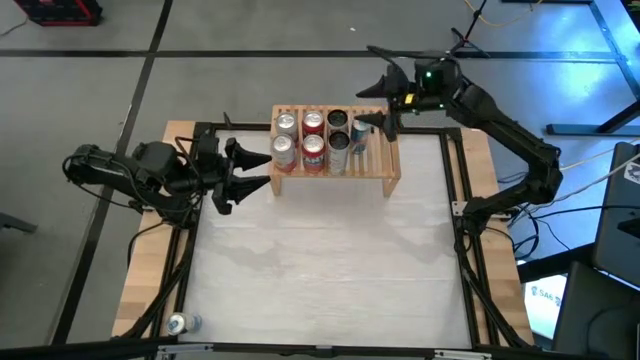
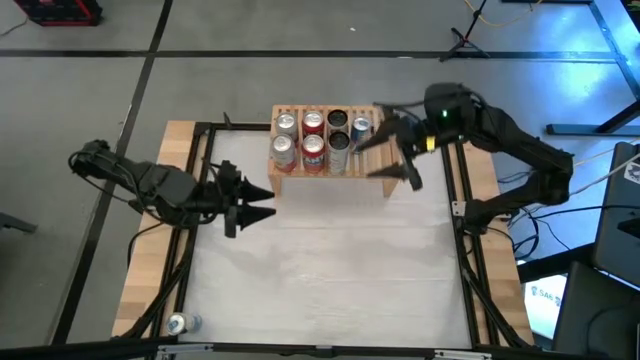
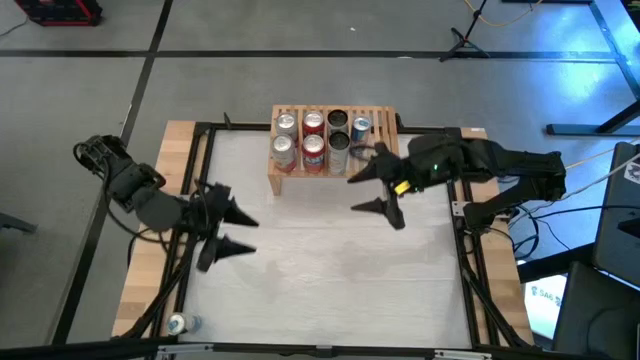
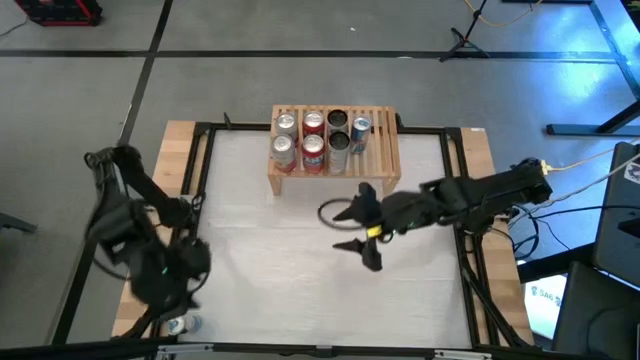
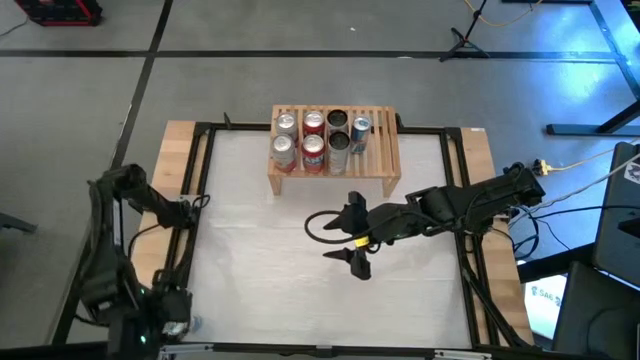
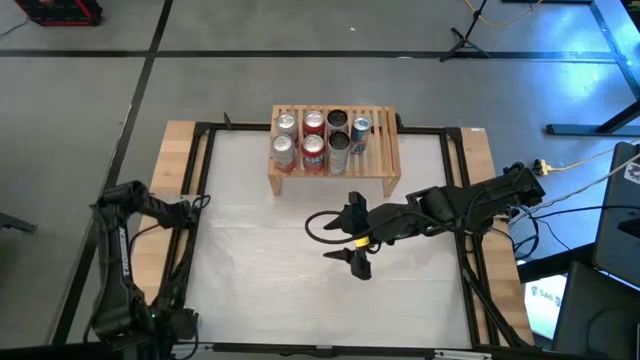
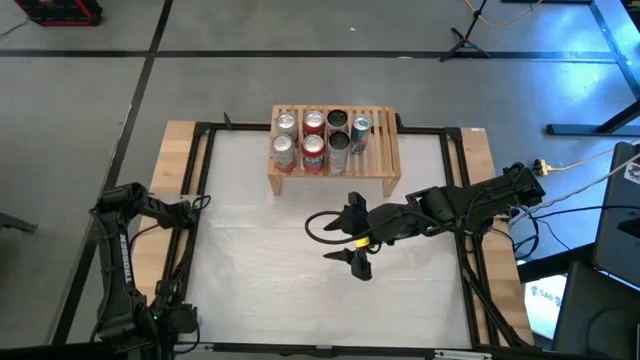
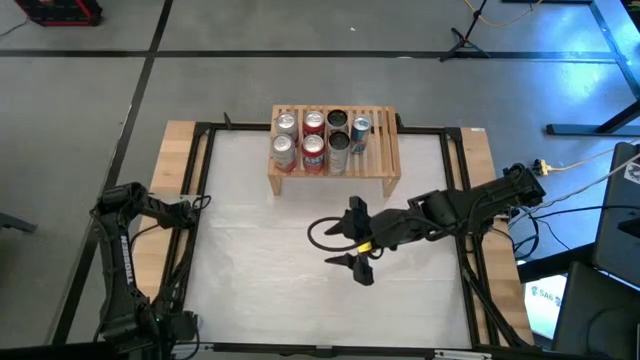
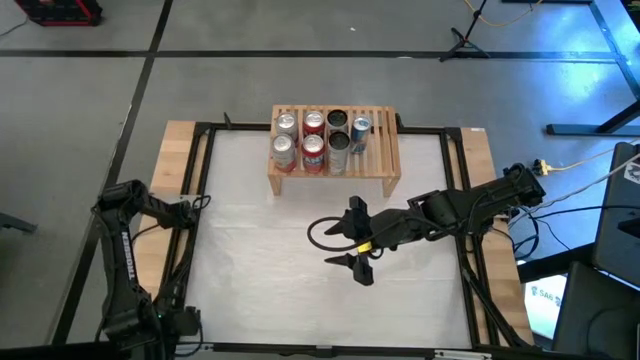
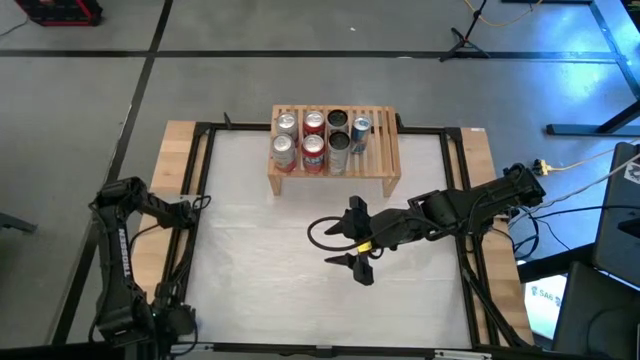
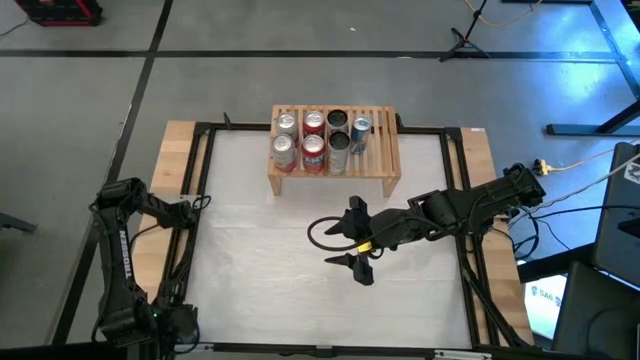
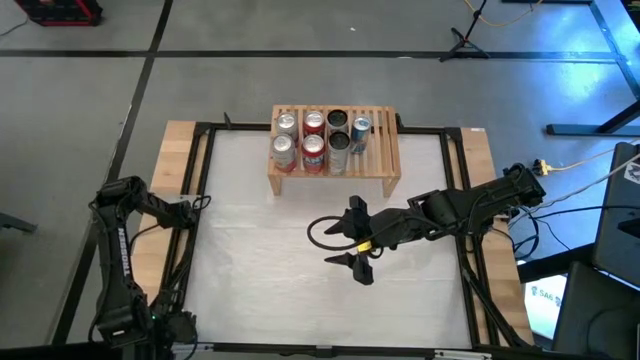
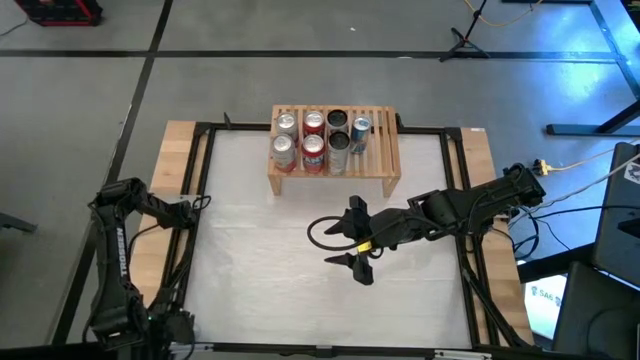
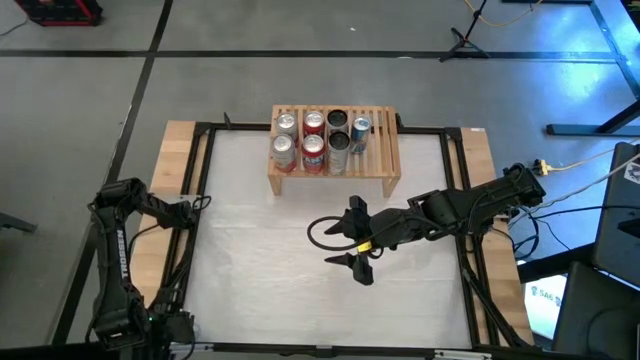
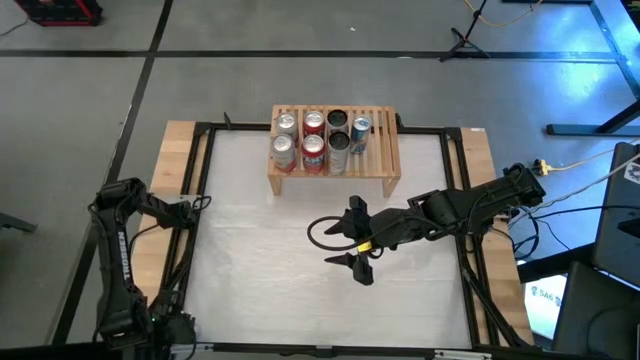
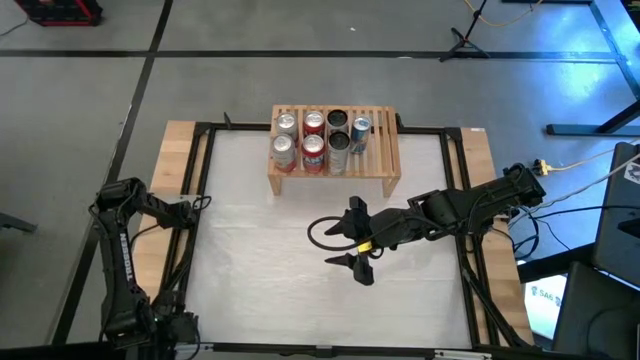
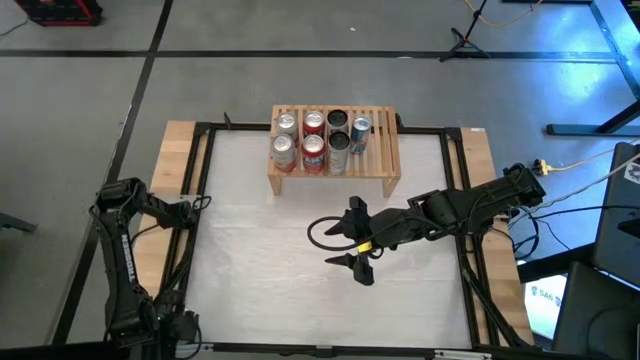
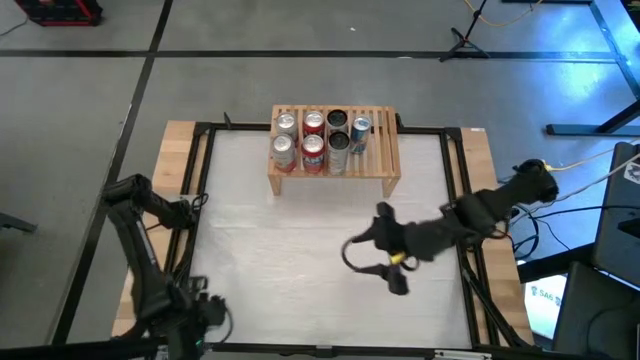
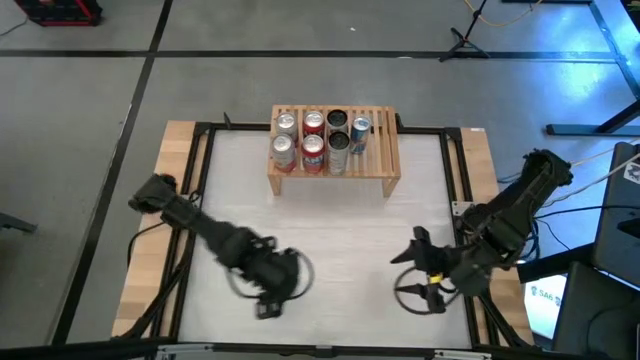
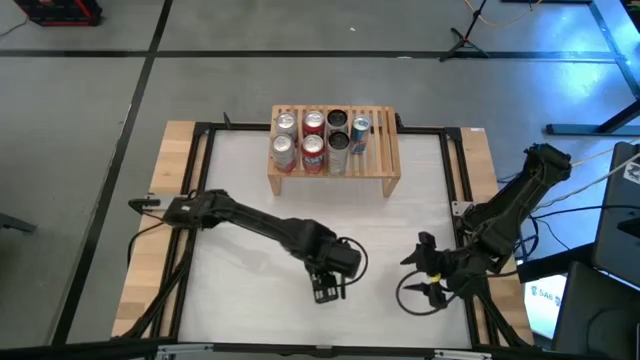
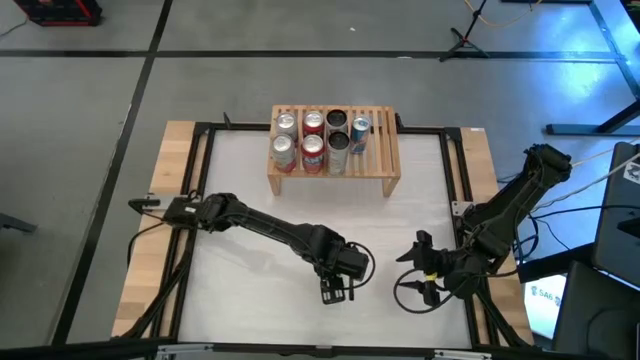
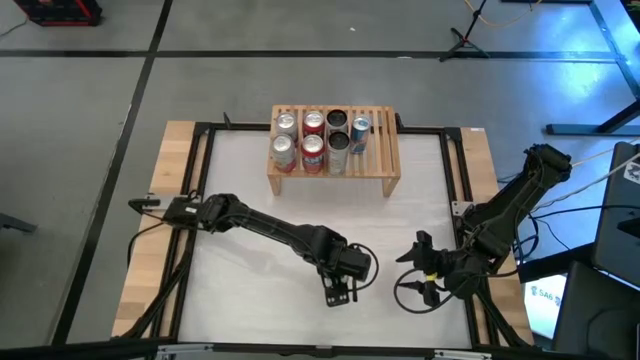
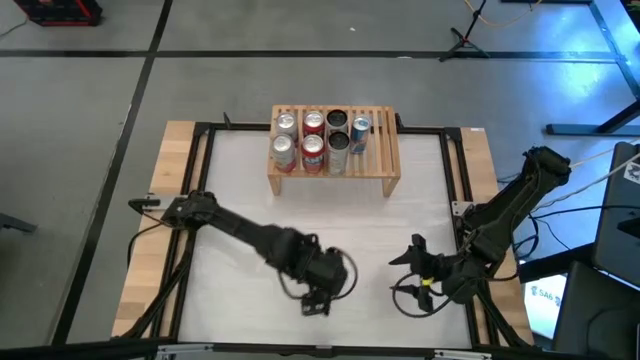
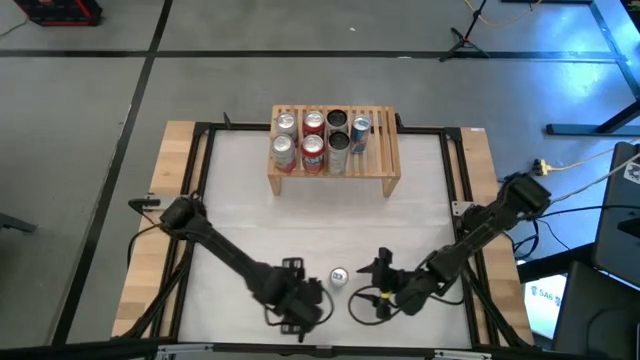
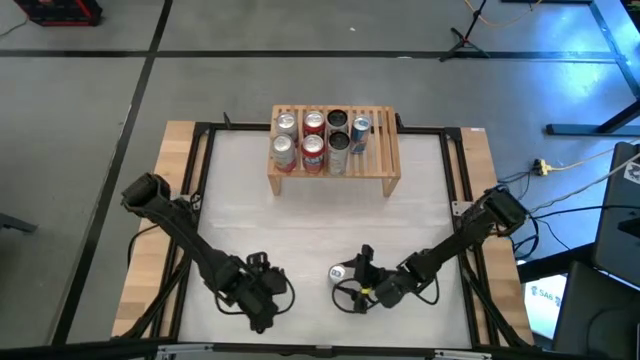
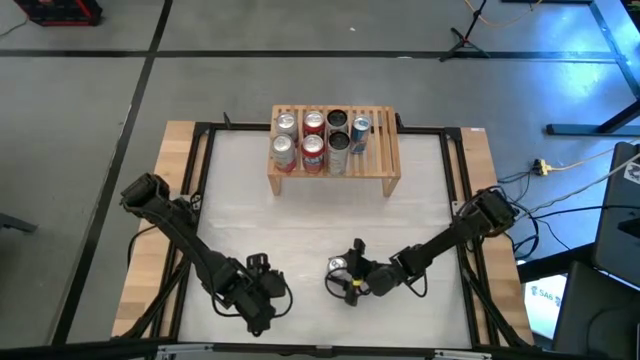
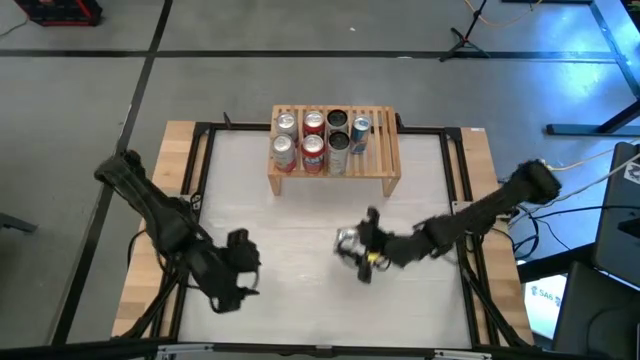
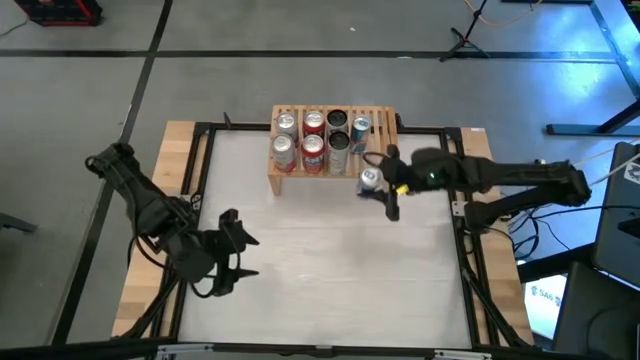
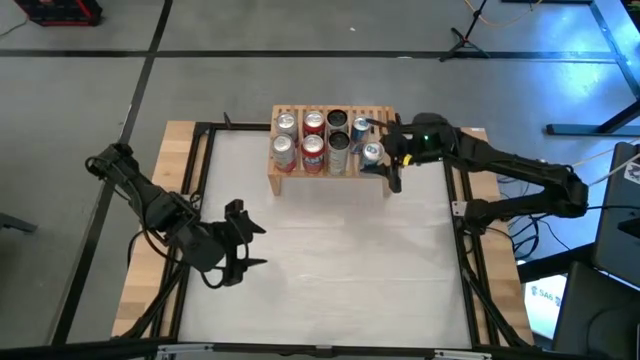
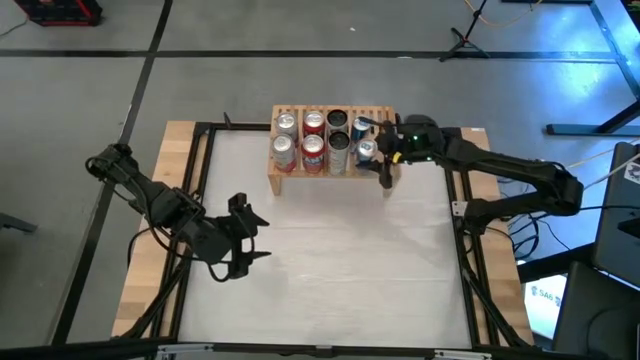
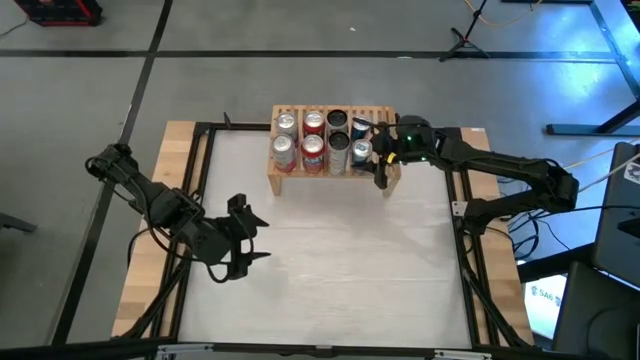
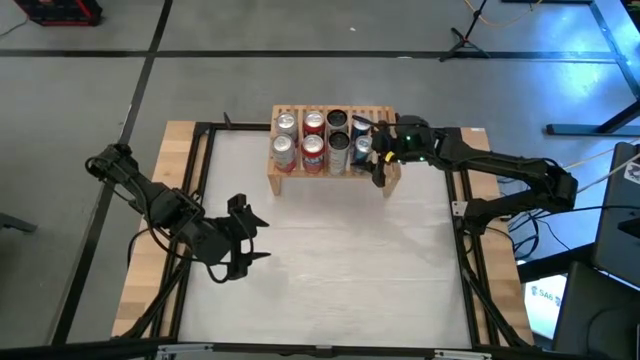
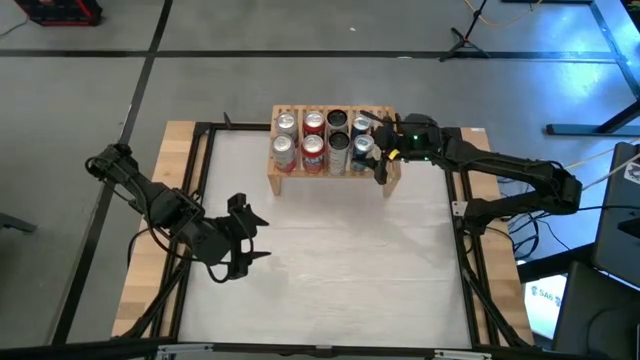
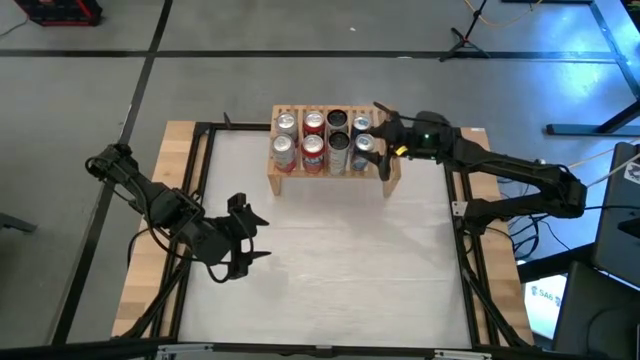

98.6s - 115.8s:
Task: Place canned beverage on shelf
Put the blue soda can on the shelf aligned with the other blue soda can

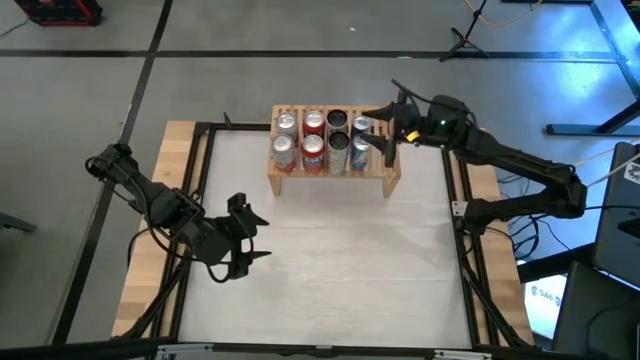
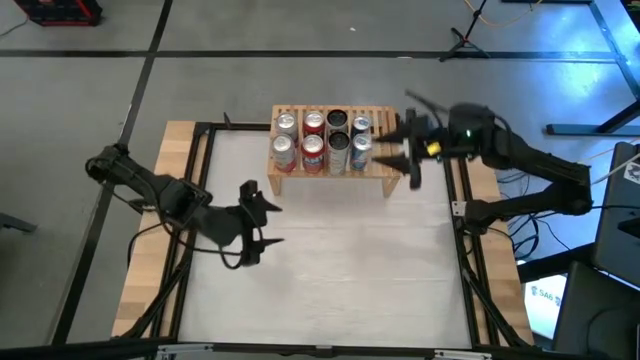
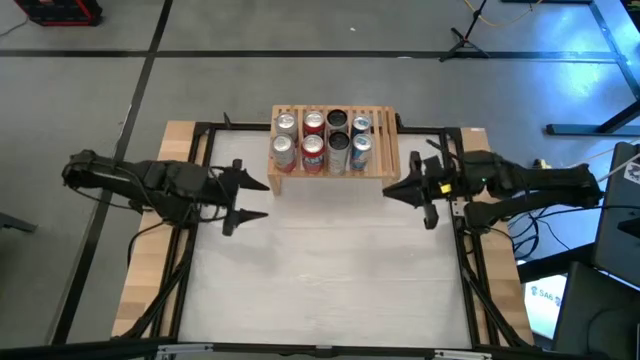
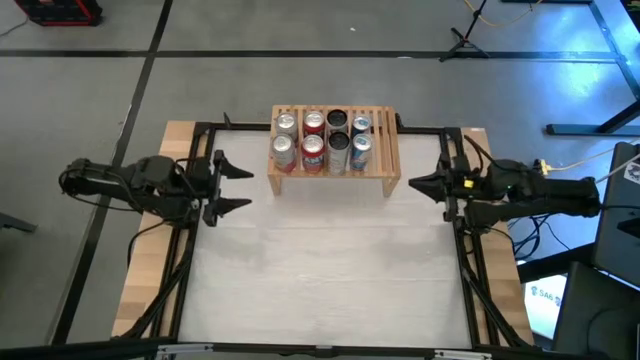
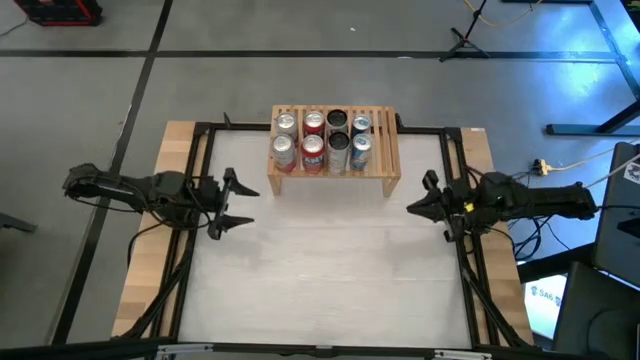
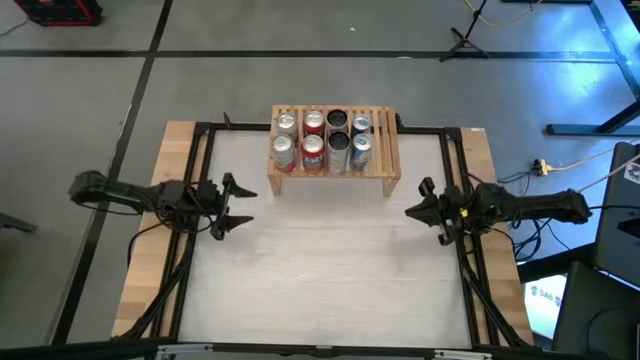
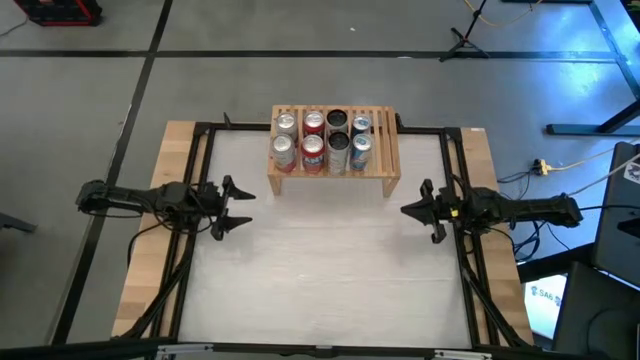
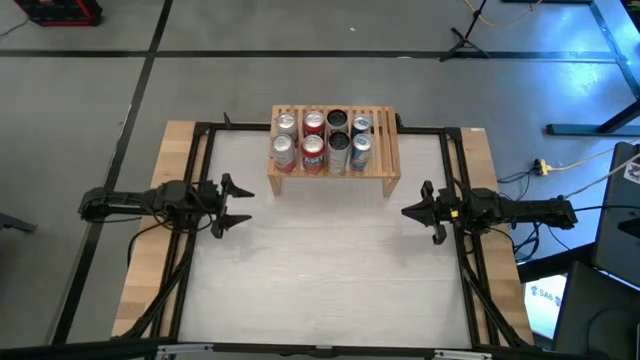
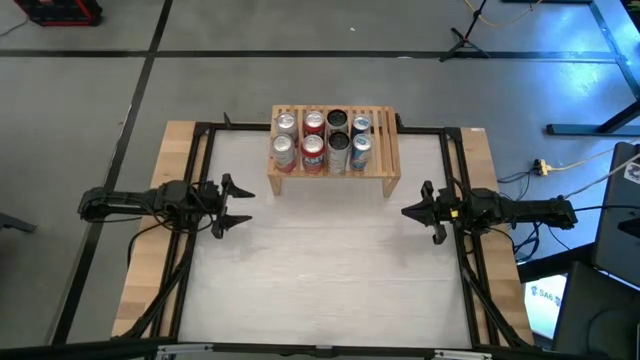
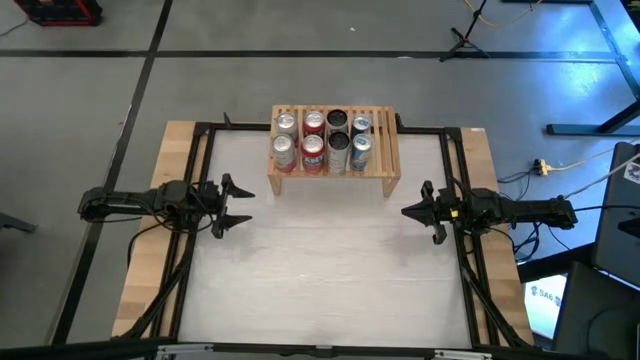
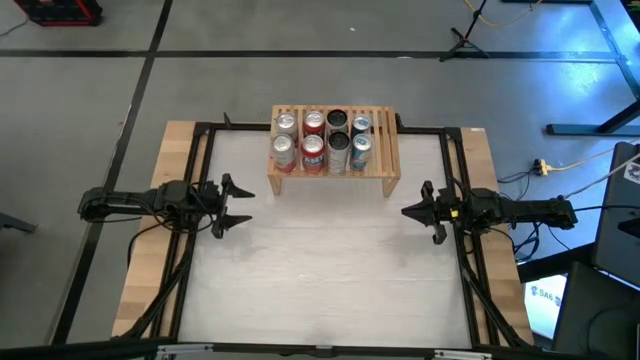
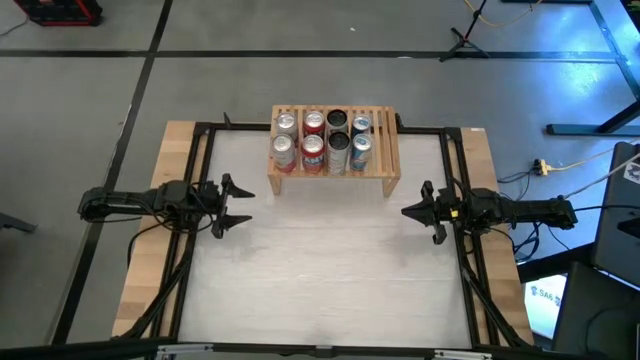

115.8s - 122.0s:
Return to Home Position
